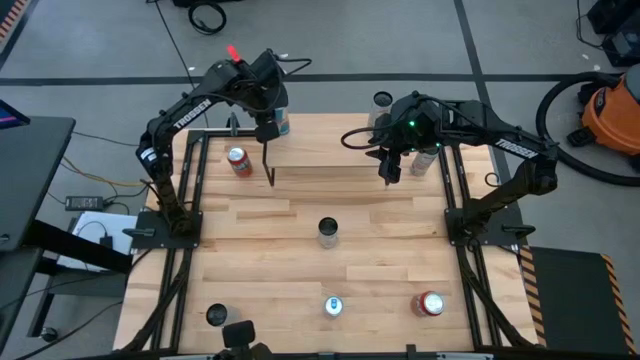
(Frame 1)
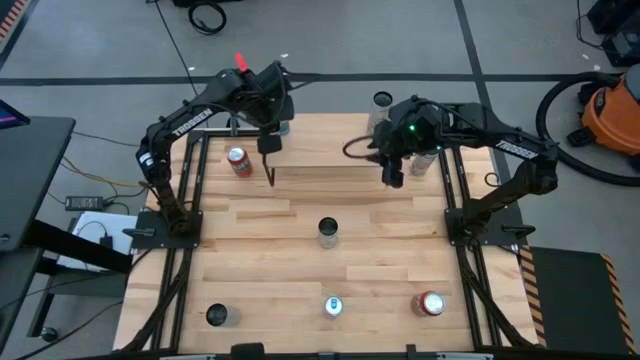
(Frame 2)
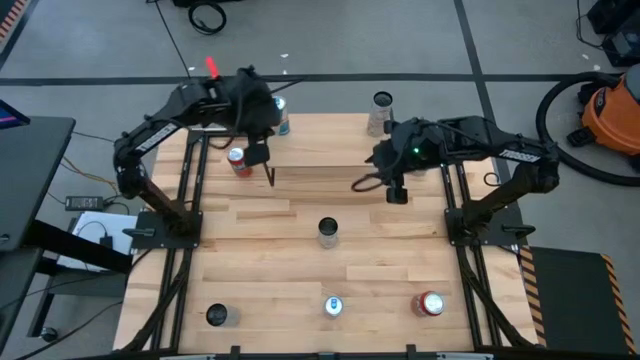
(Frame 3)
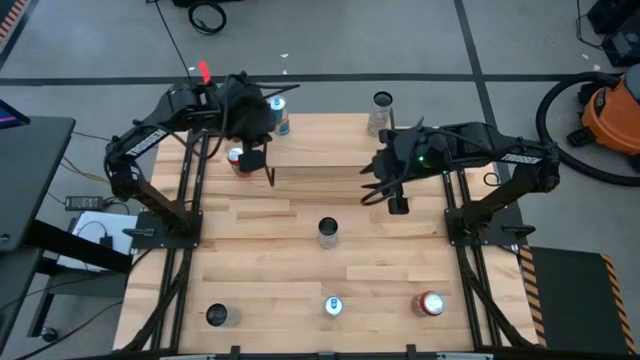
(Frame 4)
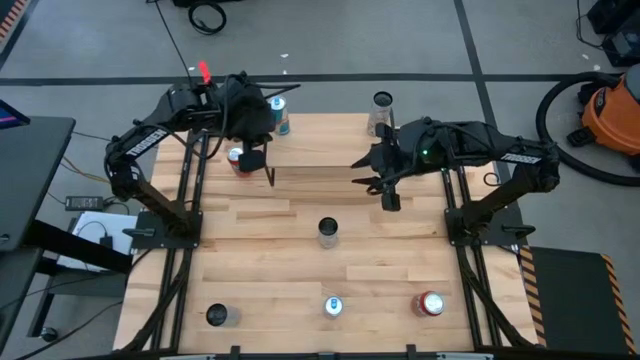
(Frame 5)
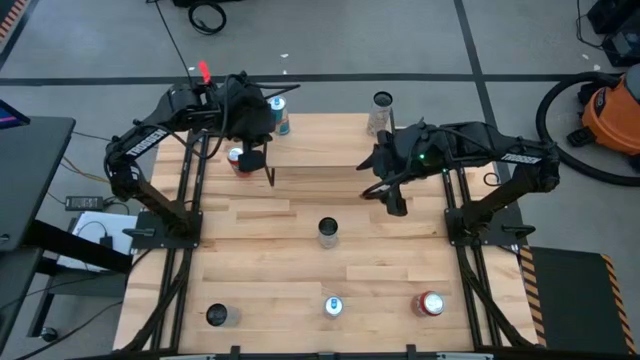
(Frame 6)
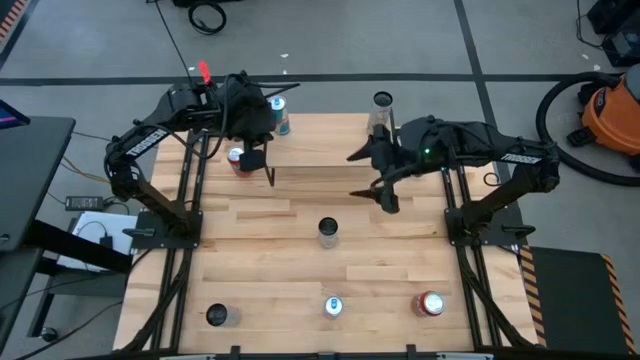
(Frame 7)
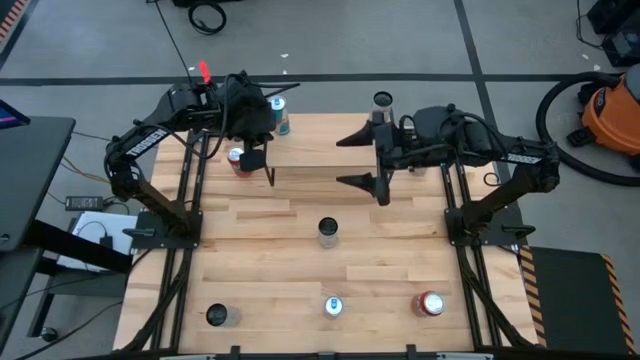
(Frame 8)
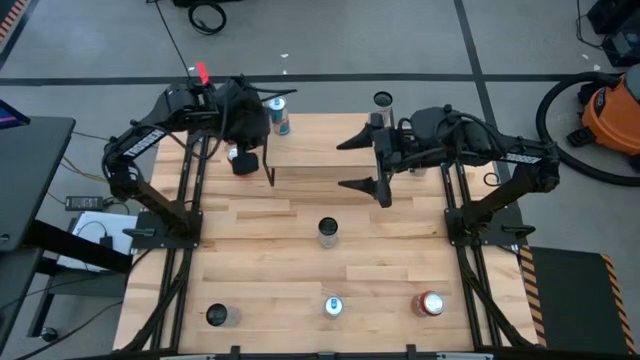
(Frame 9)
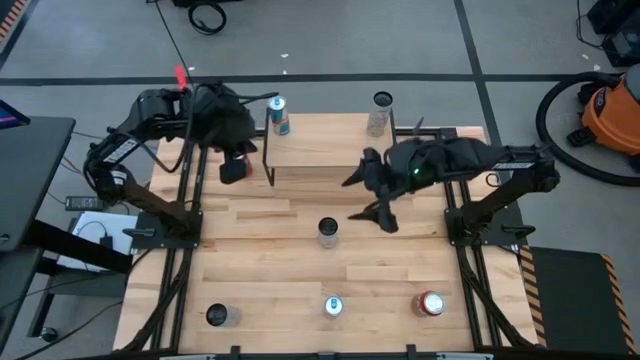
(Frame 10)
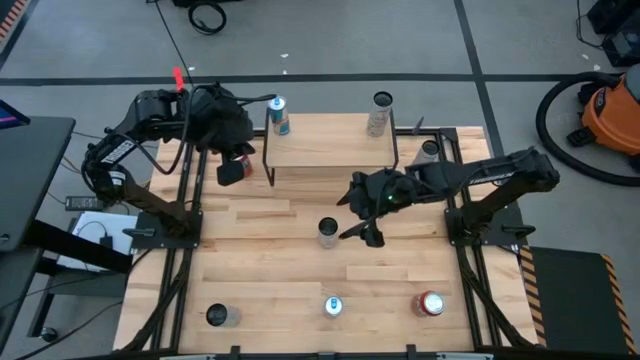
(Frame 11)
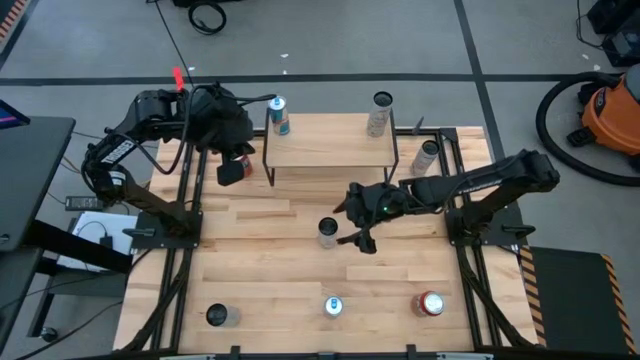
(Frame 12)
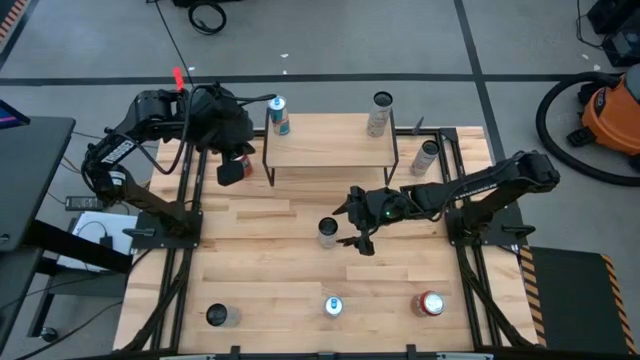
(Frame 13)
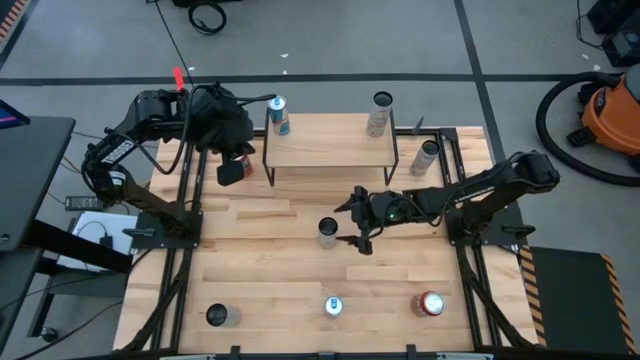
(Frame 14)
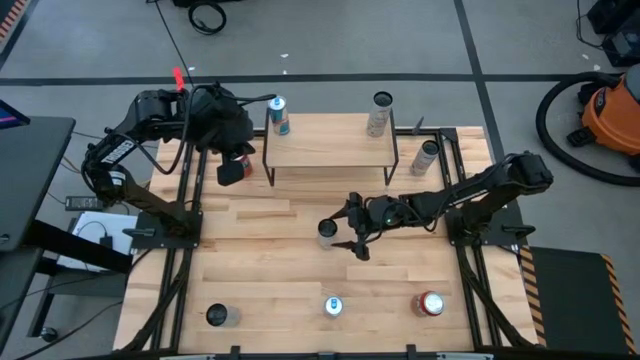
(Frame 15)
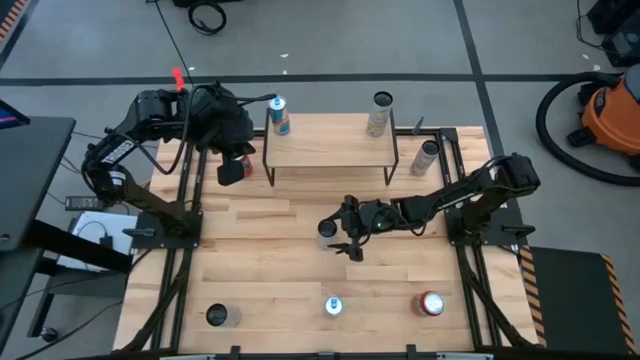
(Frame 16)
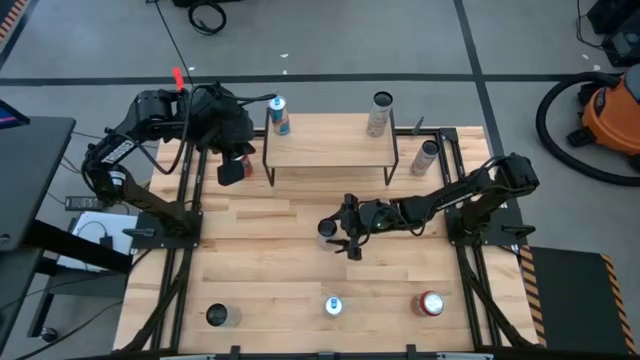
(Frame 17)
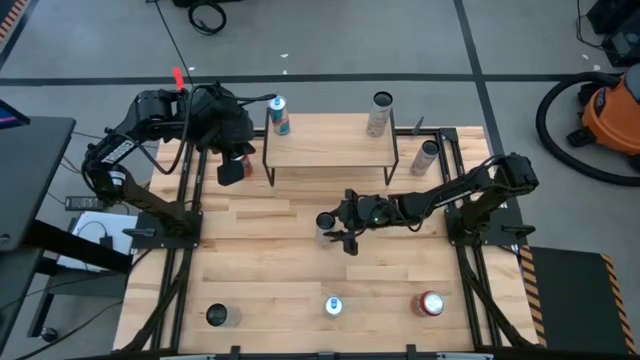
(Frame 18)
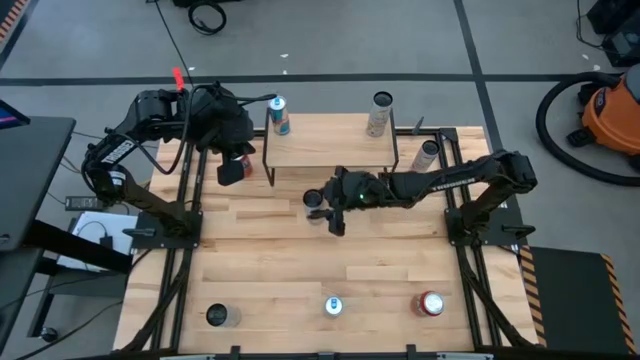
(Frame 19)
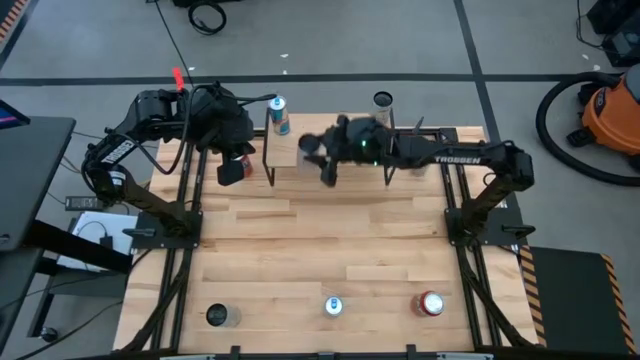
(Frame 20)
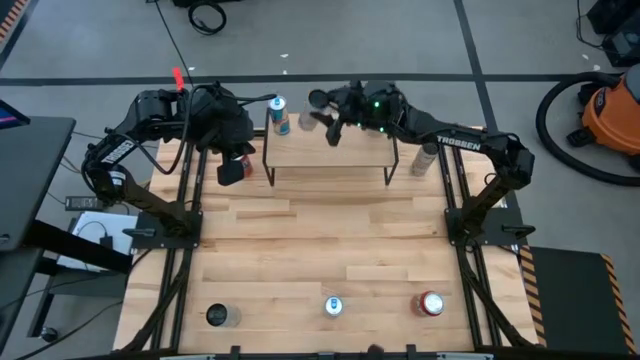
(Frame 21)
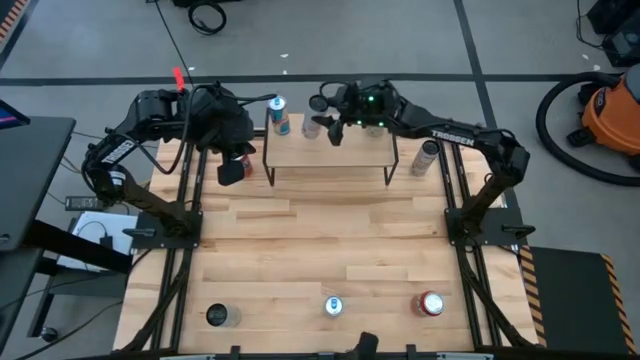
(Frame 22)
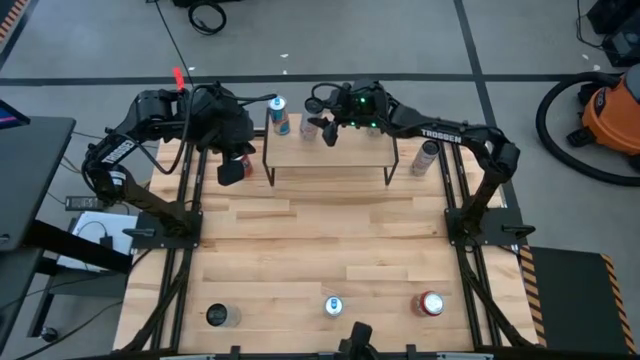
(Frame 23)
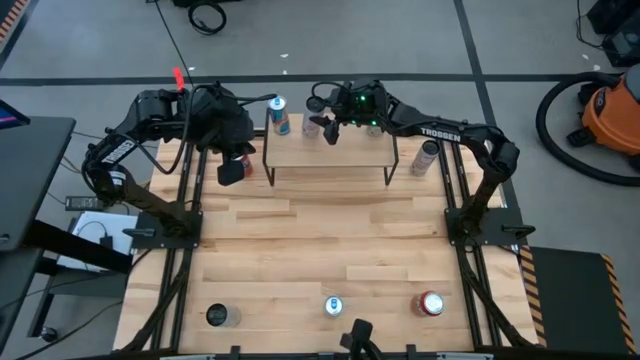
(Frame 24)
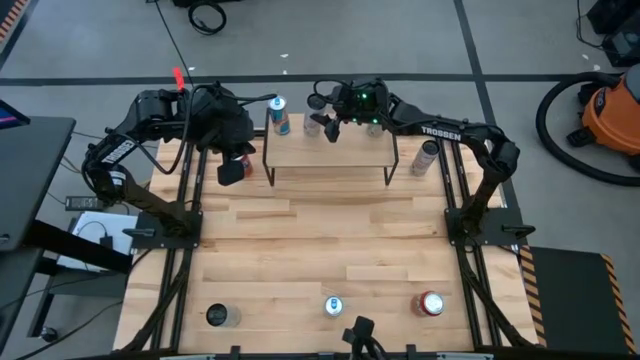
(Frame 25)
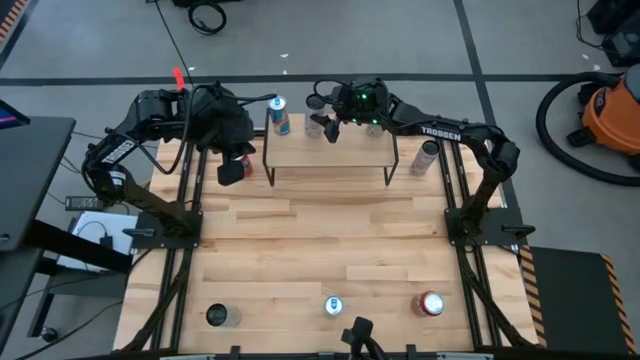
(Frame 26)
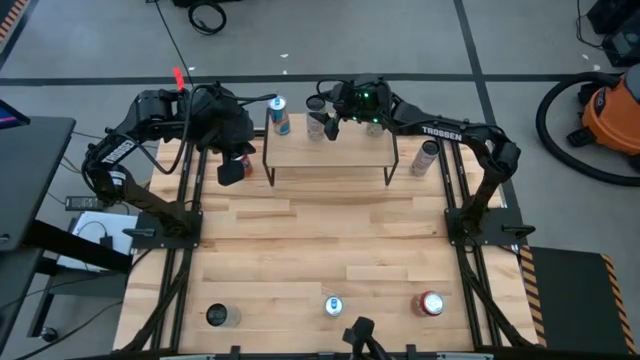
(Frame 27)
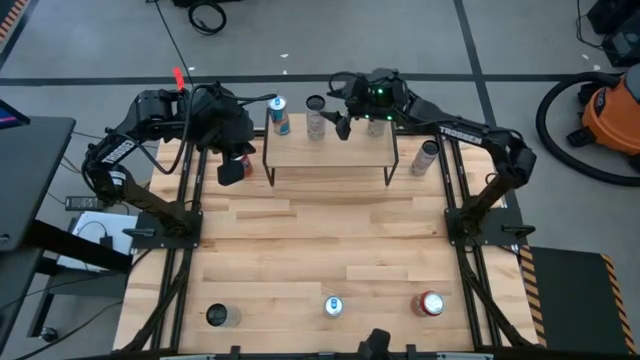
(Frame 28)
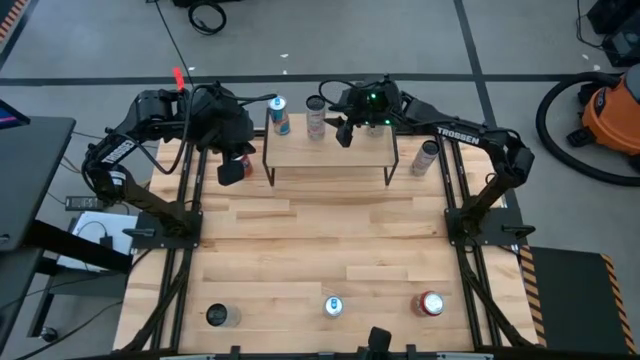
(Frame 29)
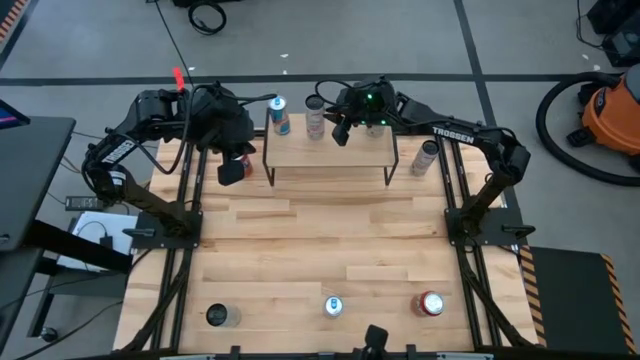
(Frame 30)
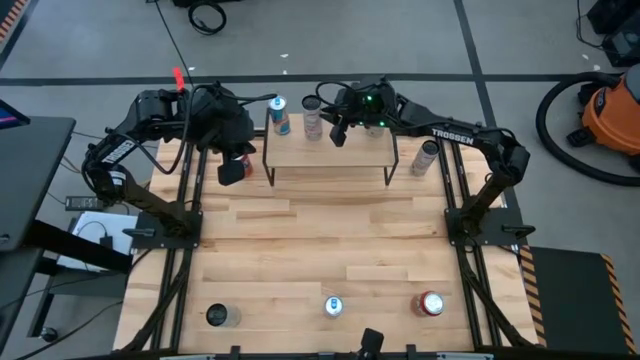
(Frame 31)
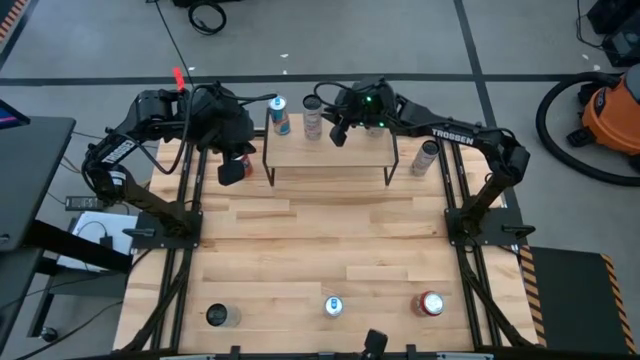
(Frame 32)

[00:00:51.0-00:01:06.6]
Task: Place canned beverage on shelf
Put the bottom white pink soda can on the shelf

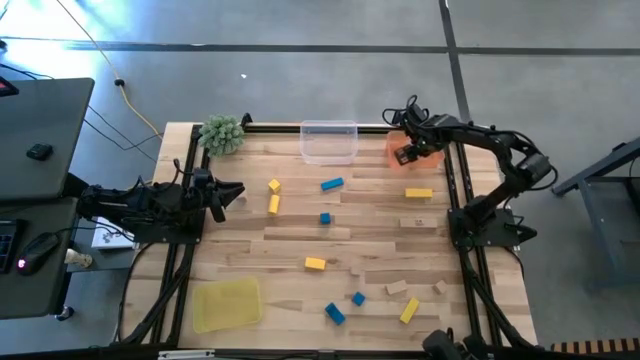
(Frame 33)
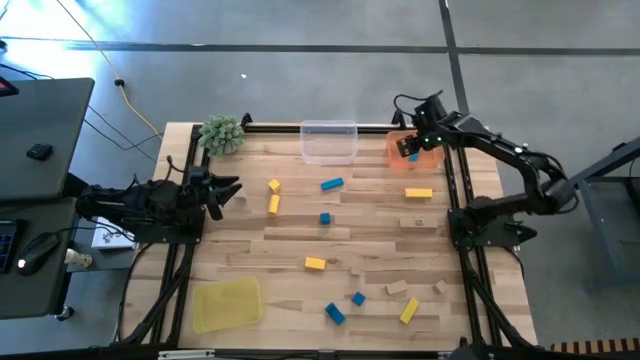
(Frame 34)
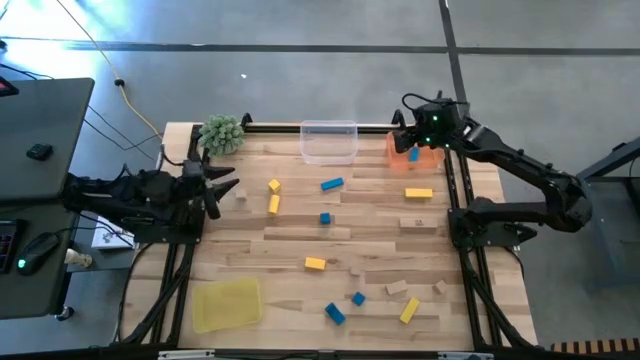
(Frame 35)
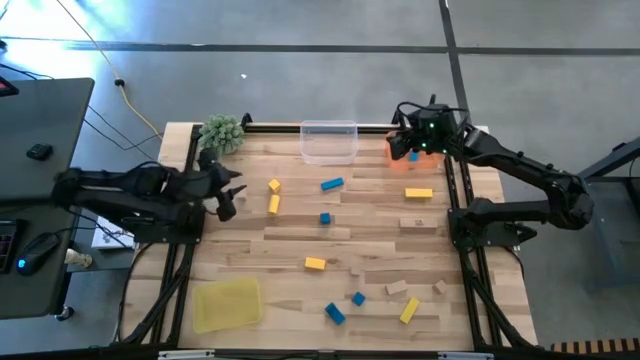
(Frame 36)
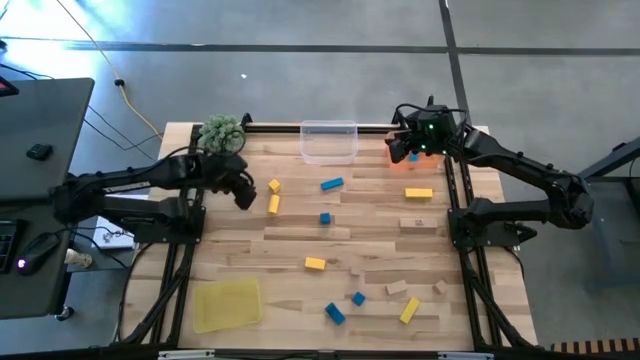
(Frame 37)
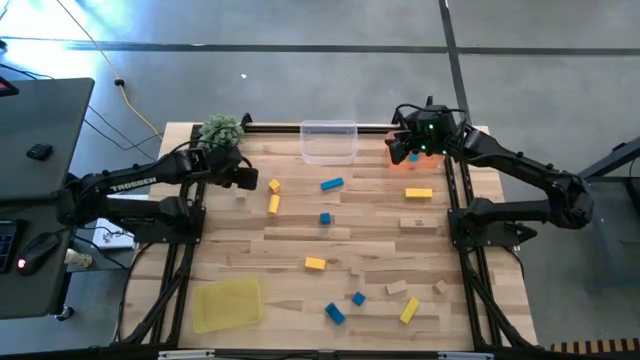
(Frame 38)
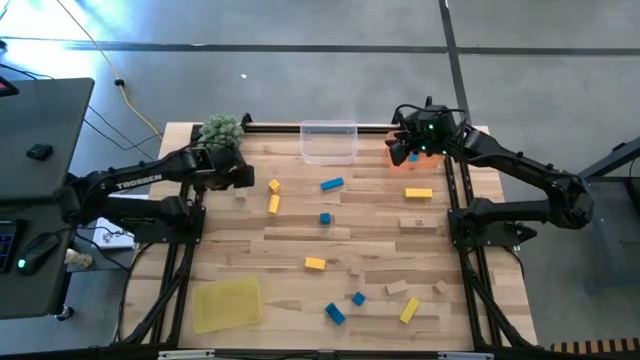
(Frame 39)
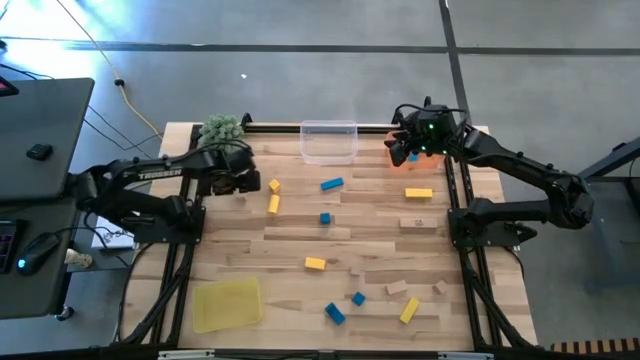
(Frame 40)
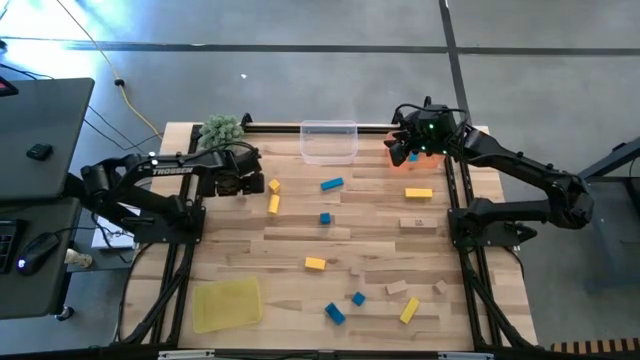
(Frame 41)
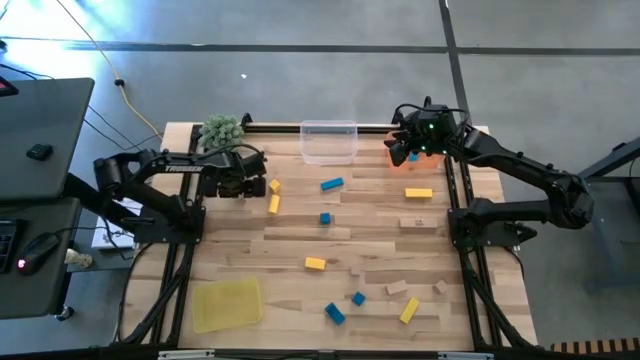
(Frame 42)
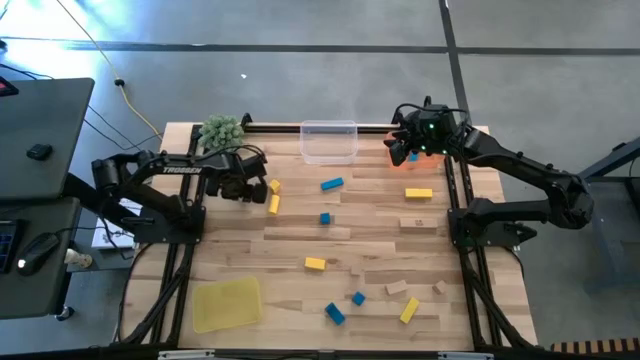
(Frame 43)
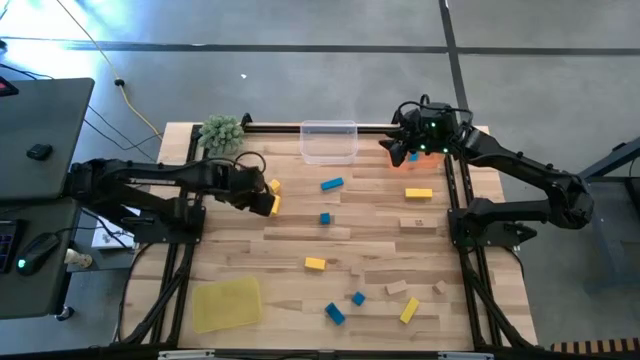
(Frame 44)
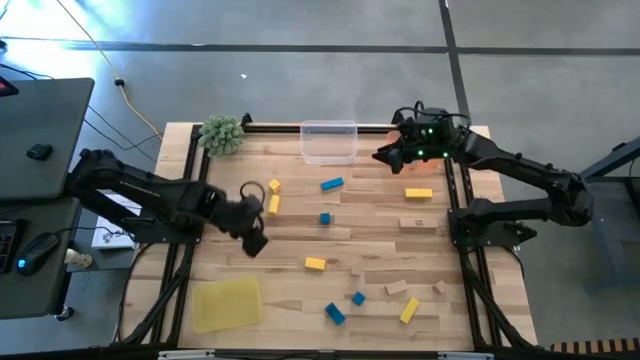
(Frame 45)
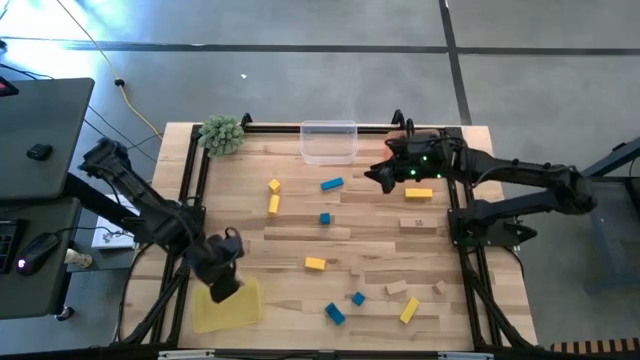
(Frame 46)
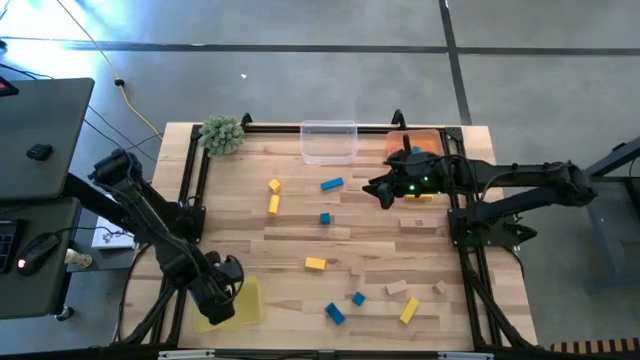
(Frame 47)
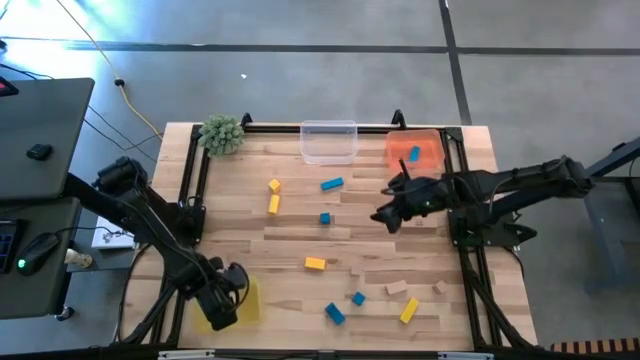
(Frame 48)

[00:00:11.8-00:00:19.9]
Task: Sort & place blocks by color
Put the brown block into the yellow bin
